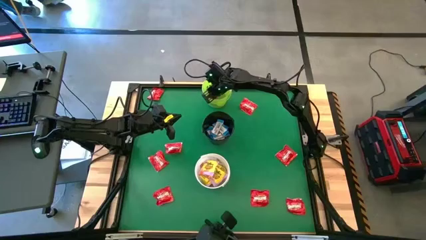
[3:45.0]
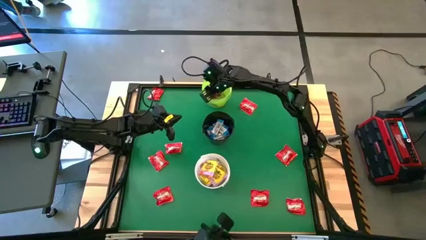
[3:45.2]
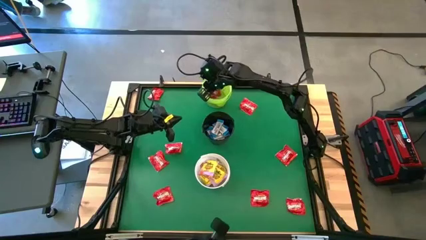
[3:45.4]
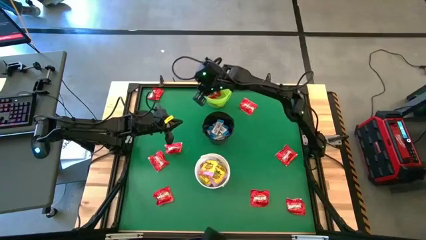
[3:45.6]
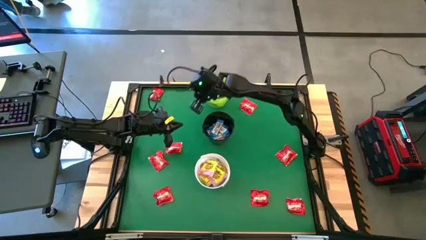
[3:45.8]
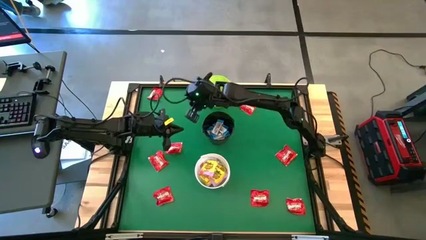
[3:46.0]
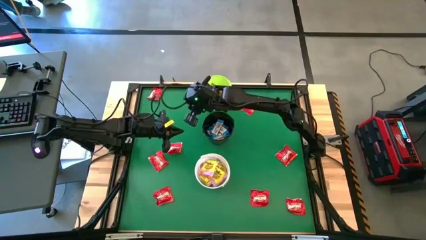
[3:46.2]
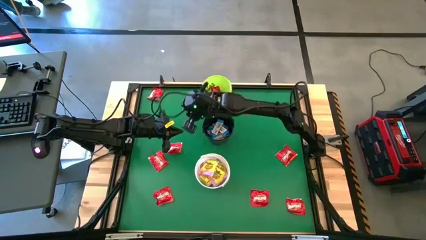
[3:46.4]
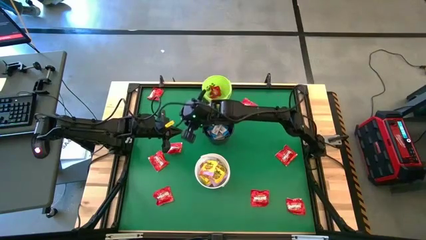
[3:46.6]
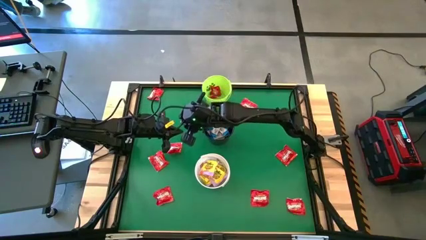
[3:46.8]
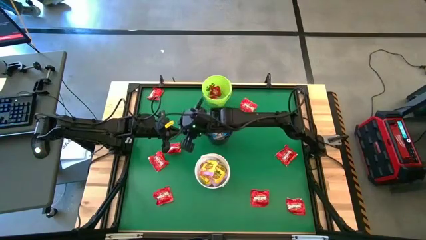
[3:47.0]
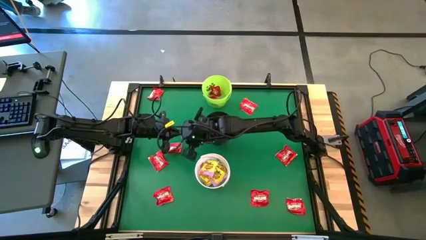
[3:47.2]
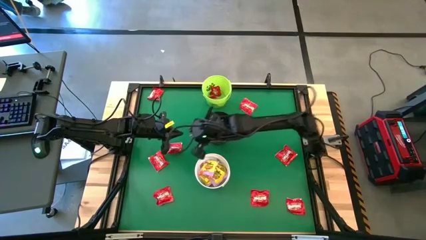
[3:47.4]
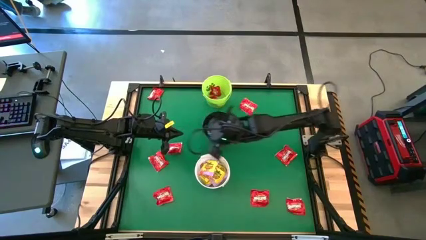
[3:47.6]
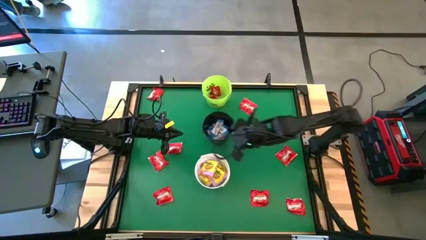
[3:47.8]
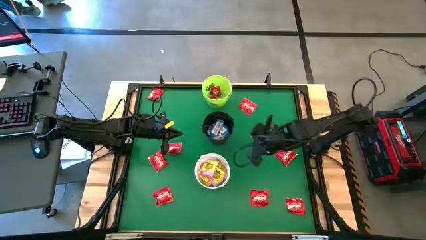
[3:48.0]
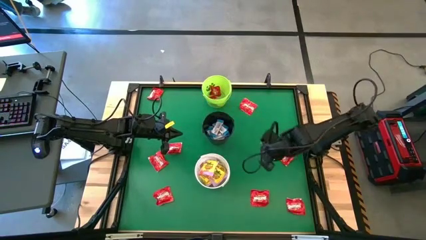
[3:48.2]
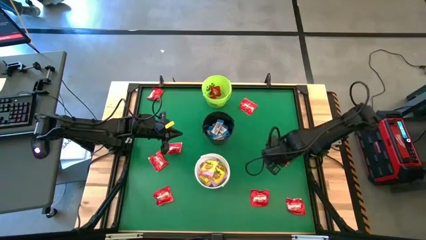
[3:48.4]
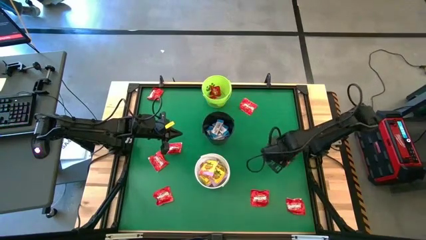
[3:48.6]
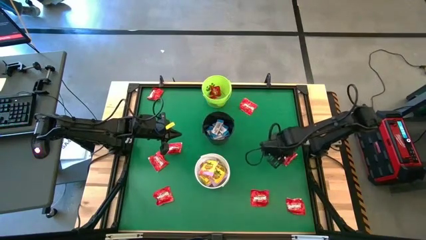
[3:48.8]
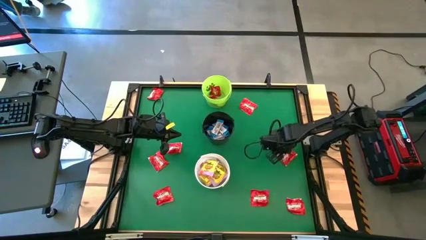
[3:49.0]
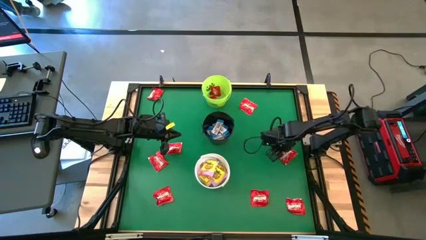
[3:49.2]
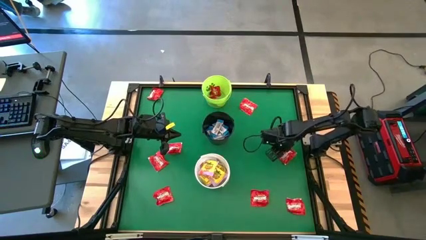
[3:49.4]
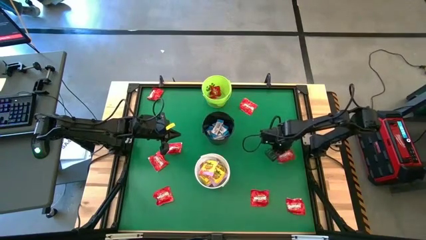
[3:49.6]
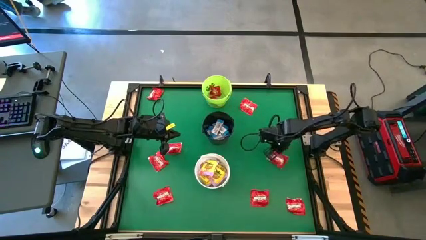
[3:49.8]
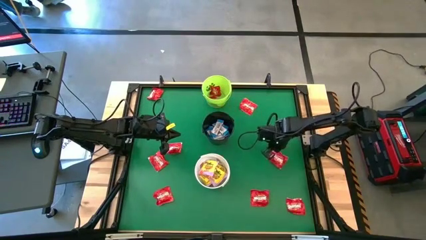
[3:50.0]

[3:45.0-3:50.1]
Task: Sort candy by brand, put in halloween buckets
Put the red candy into the green bucket

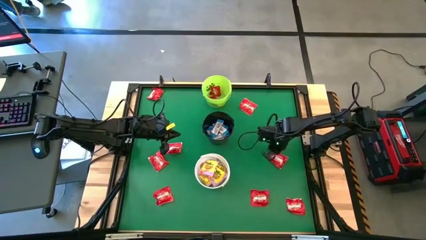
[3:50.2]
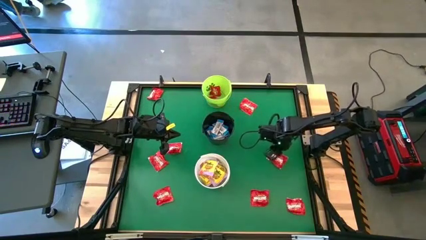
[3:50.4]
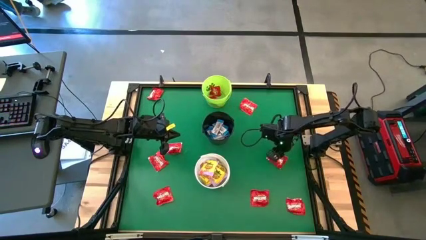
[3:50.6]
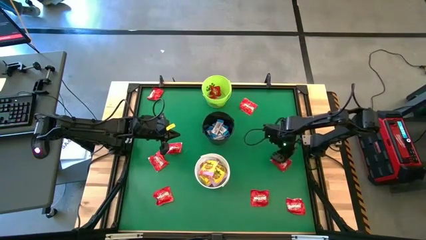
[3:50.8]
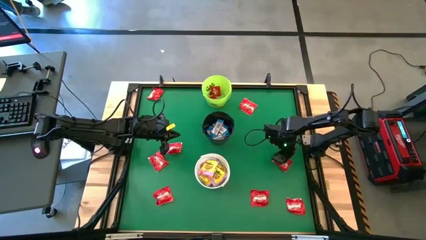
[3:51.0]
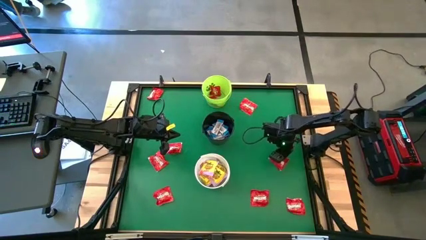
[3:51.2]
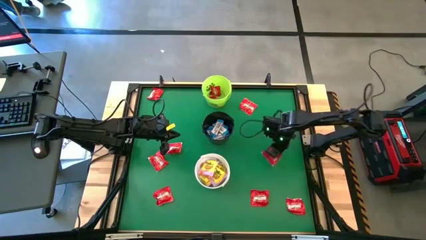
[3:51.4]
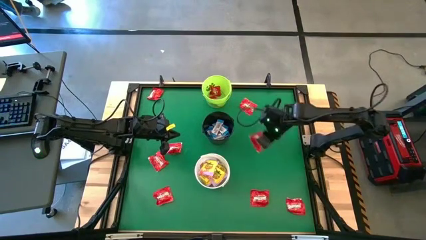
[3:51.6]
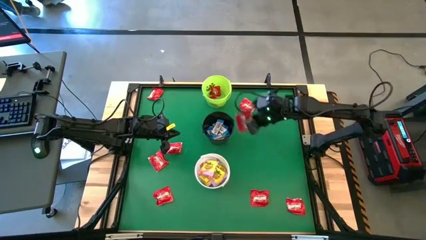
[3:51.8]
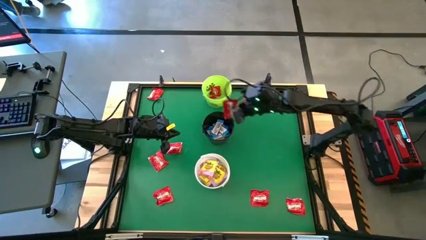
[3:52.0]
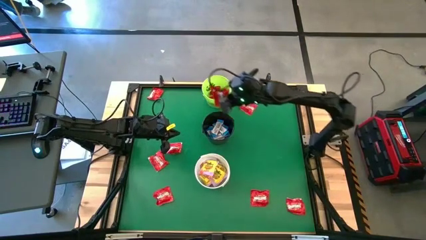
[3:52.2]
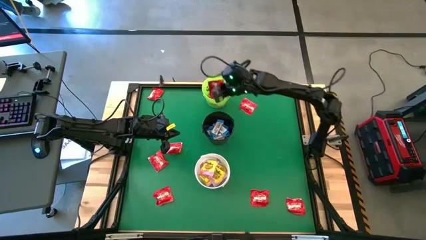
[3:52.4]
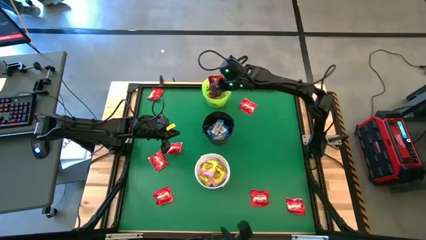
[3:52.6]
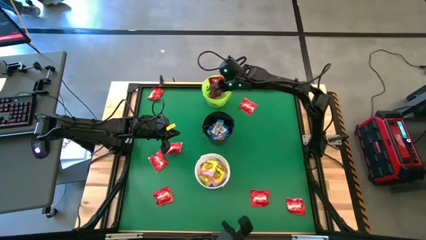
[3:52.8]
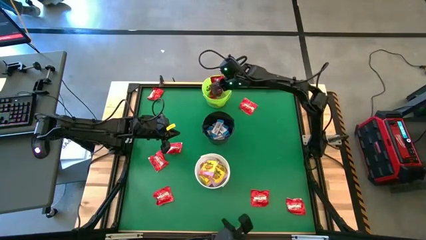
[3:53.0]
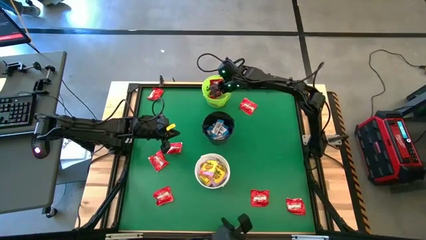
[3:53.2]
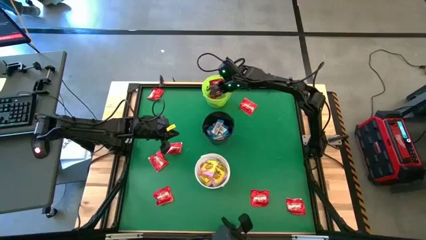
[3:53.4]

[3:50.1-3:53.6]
Put the red candy into the green bucket

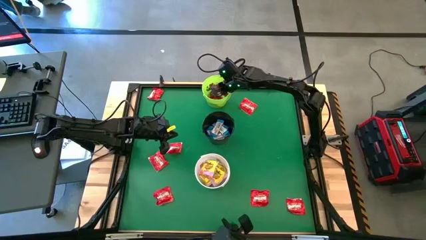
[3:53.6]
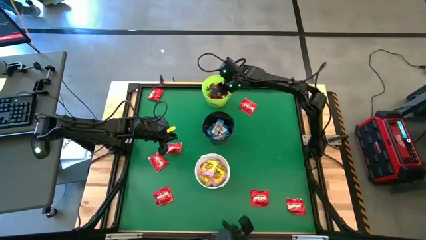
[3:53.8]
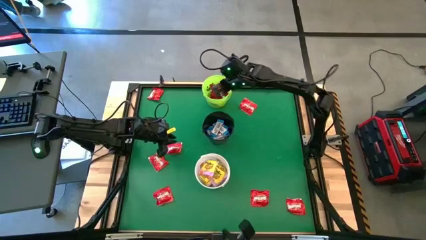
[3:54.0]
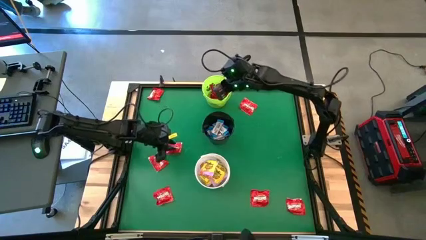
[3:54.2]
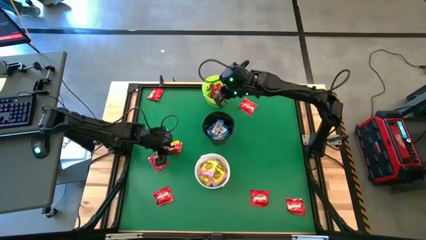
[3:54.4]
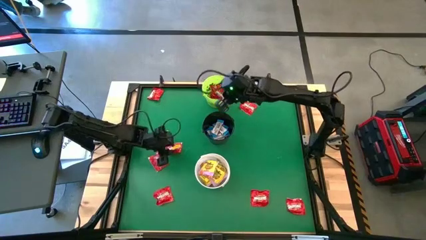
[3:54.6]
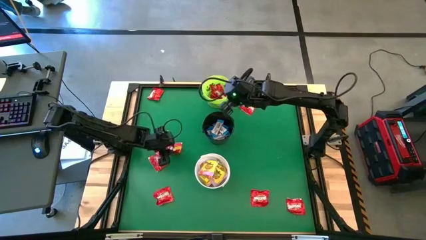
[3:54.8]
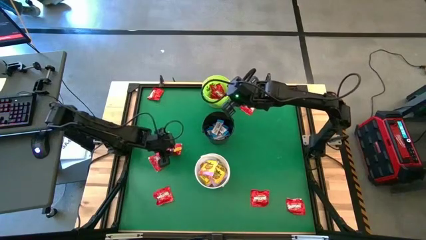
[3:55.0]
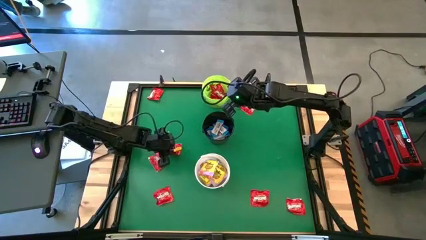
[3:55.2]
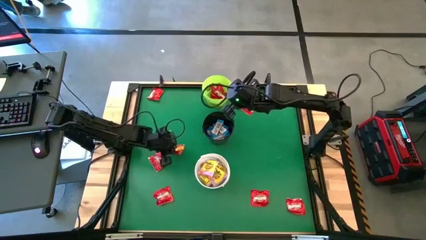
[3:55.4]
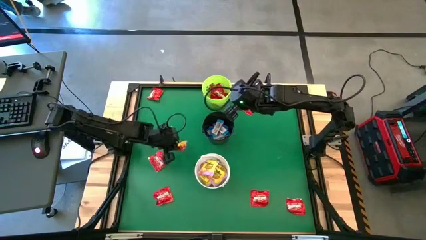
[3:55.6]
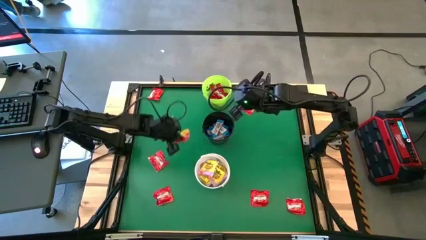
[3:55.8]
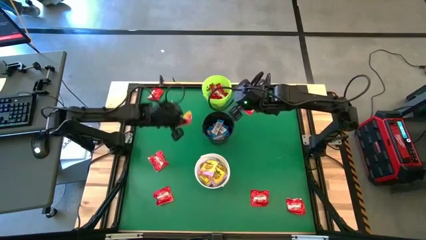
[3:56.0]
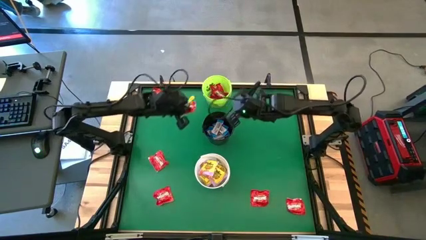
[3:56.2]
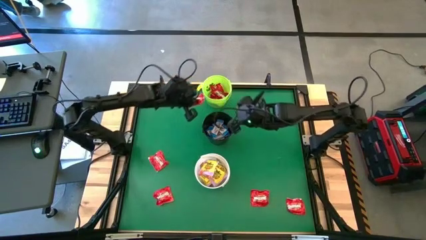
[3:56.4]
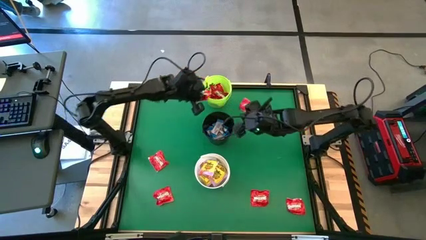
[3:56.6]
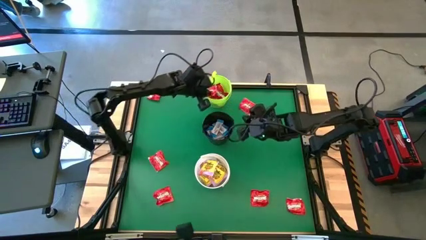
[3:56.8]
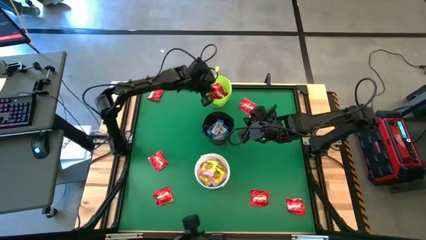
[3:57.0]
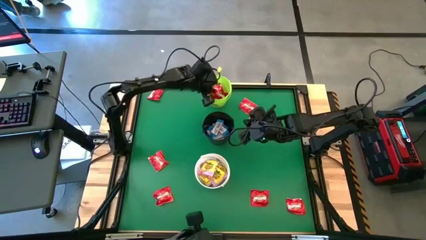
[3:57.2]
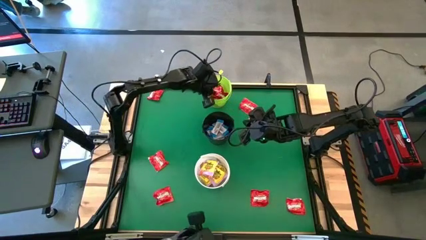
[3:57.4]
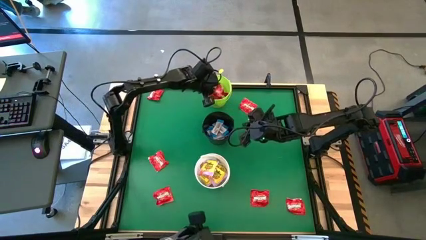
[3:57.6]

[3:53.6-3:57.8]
Put the red candy into the green bucket

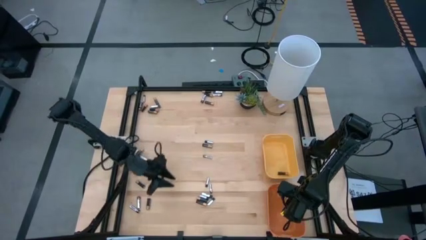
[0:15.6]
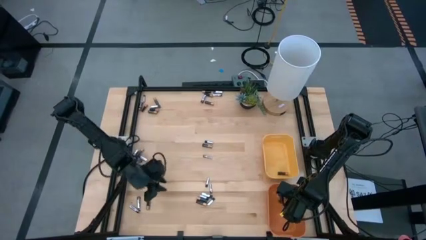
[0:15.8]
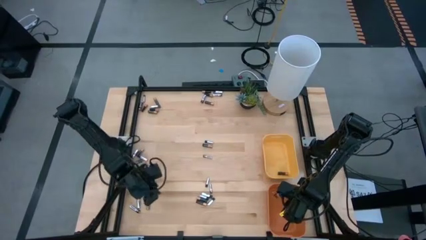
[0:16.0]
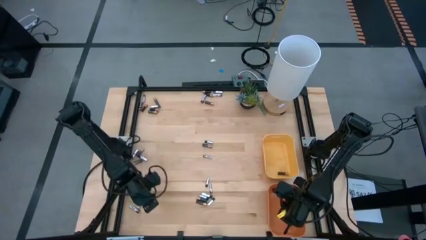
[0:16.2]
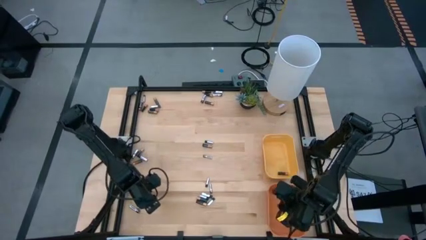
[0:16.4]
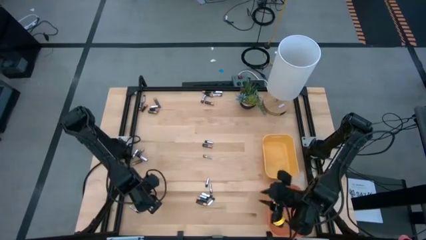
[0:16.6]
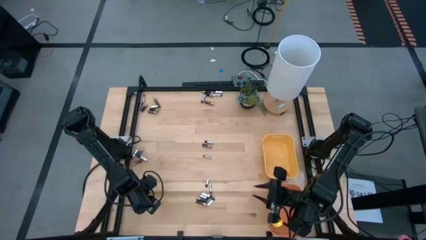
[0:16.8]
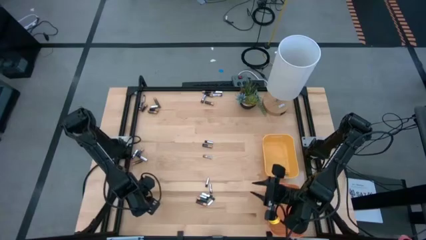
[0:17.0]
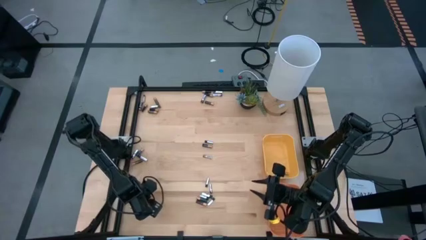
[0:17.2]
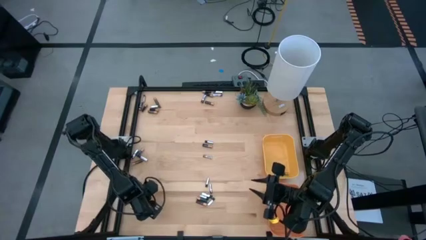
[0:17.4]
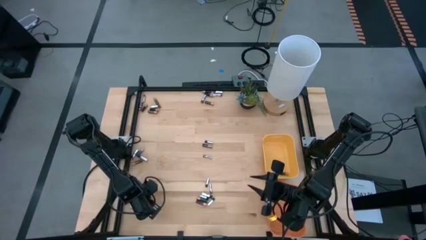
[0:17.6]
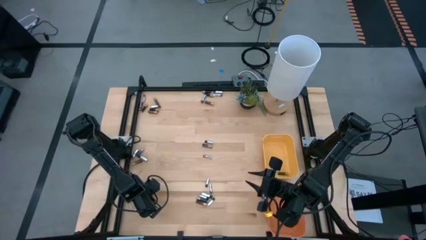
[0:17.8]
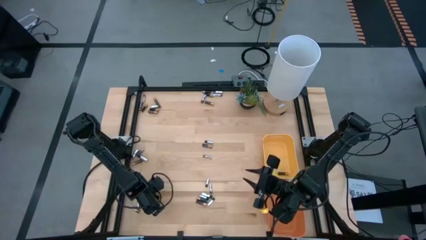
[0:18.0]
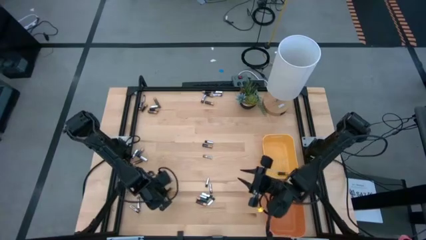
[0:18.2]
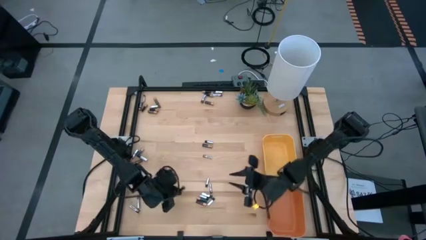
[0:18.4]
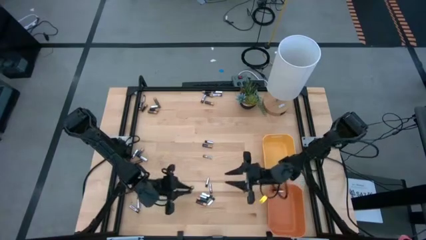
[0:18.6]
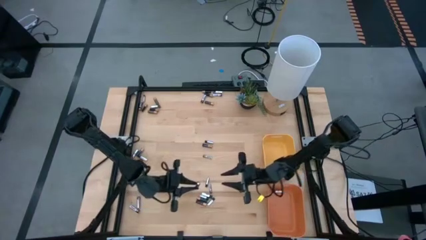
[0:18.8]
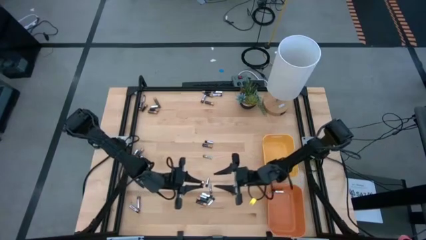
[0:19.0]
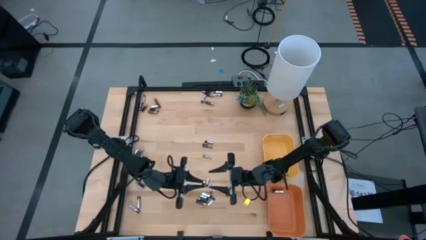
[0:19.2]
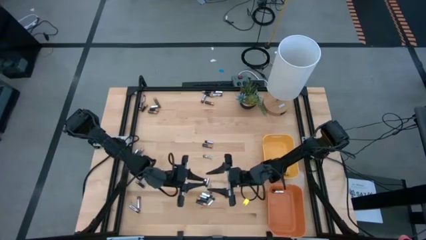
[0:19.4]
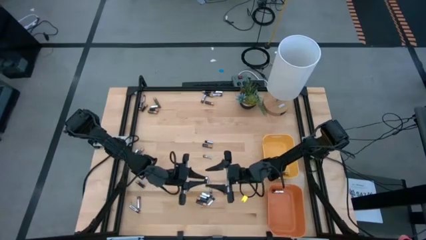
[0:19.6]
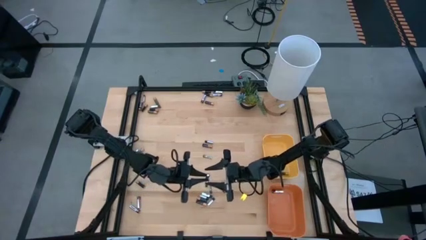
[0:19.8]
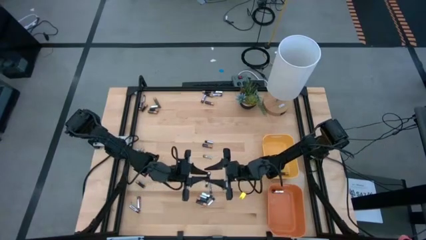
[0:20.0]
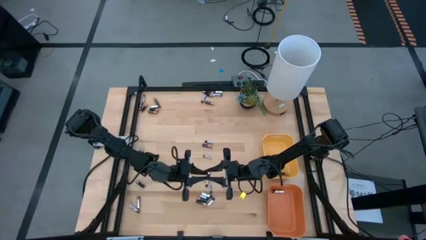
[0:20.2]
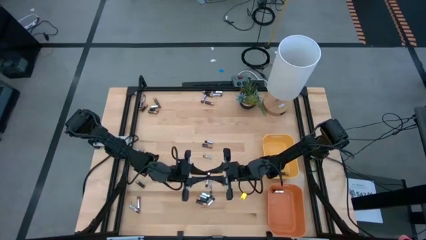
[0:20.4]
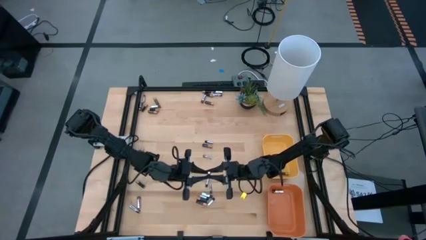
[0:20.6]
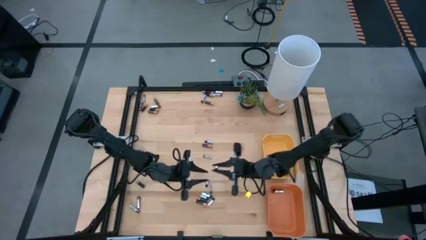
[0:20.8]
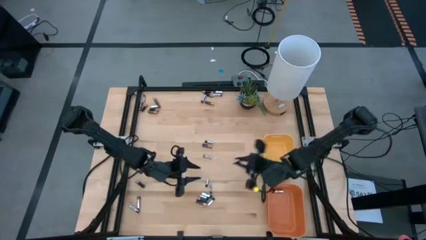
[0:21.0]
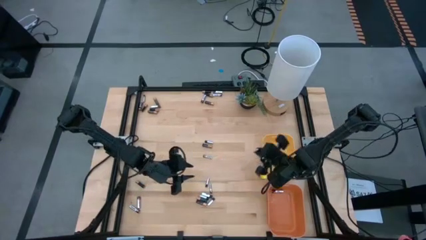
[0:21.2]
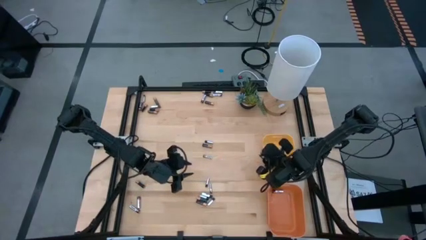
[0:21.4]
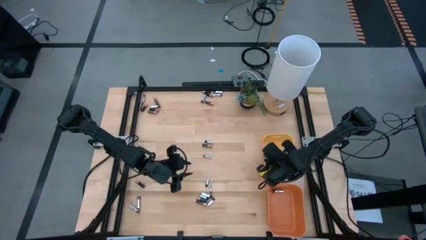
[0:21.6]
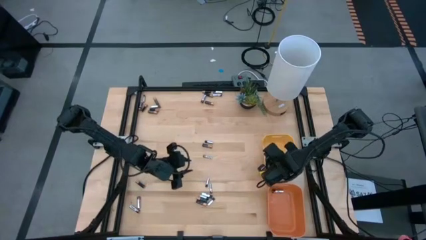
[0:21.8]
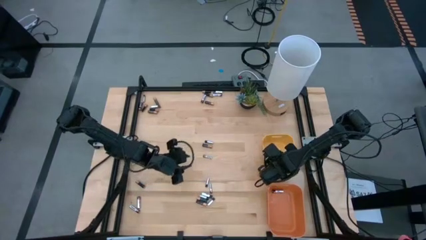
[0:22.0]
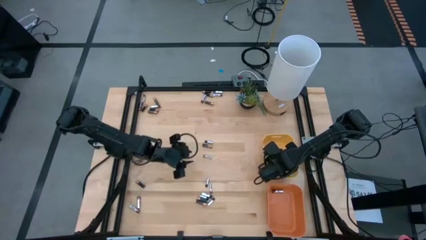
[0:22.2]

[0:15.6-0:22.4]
Task: Sort batteries
Put the brown battery into the yellow bin
